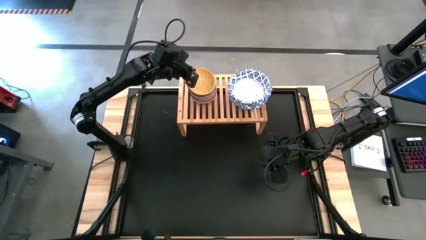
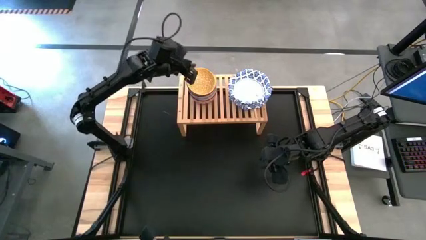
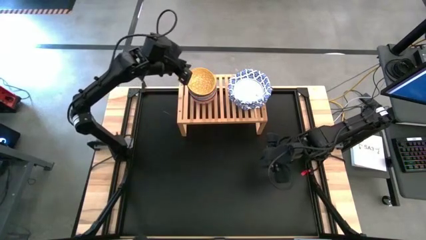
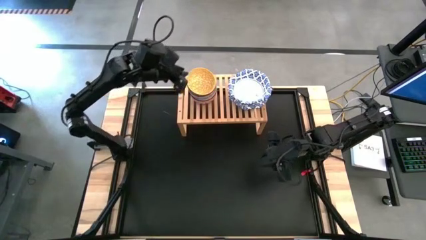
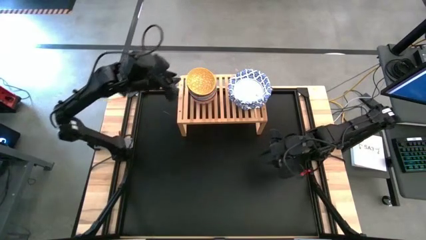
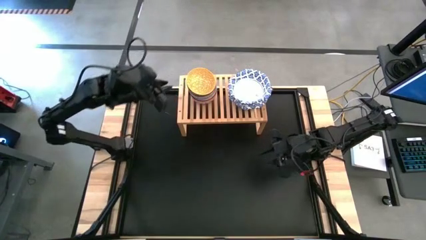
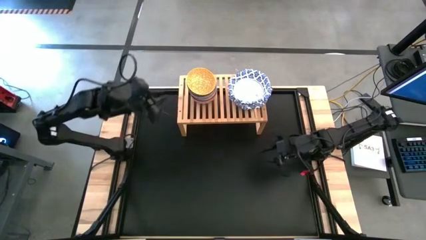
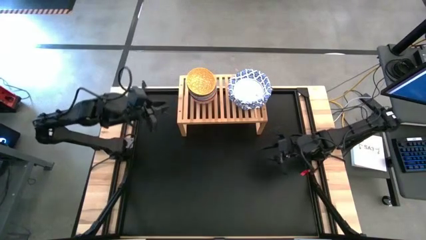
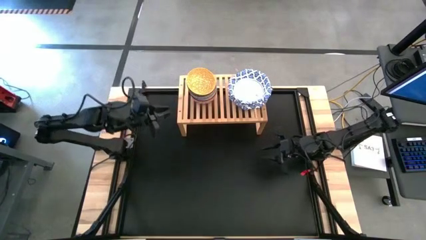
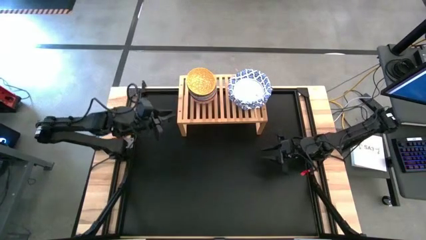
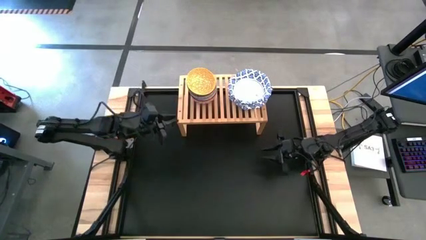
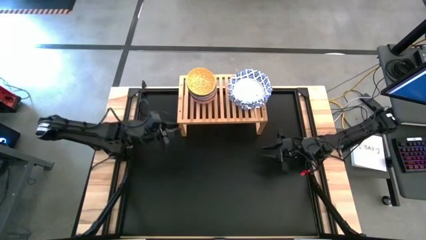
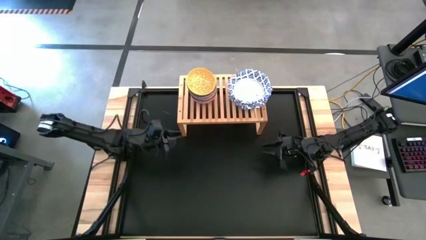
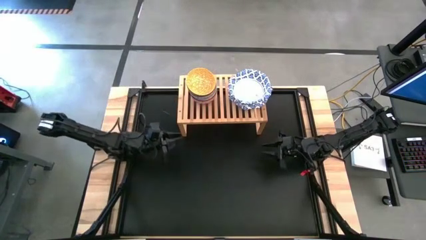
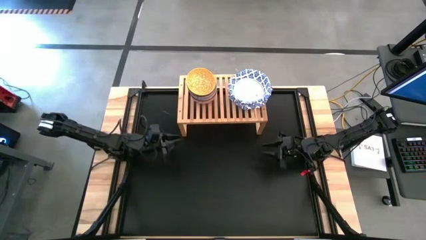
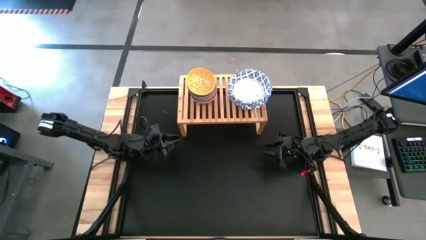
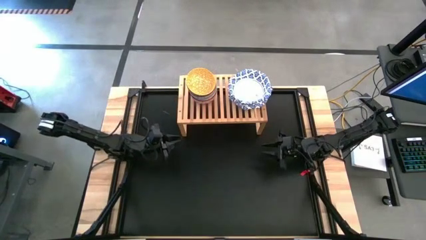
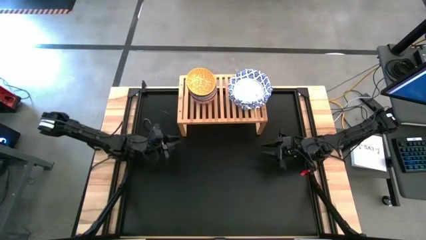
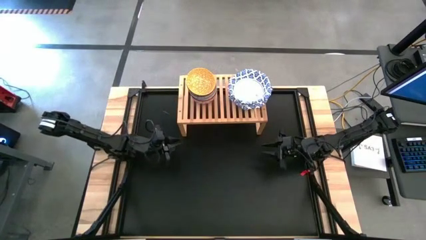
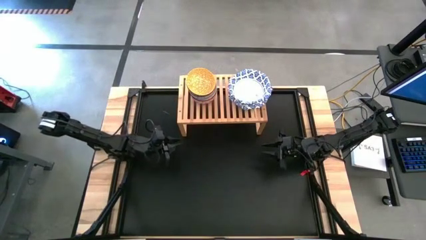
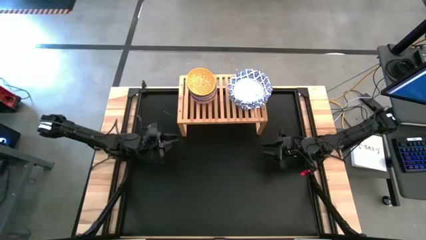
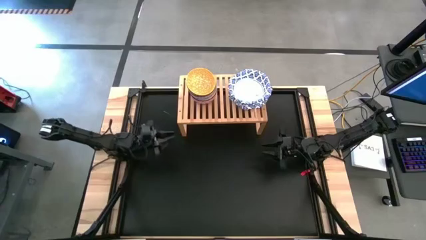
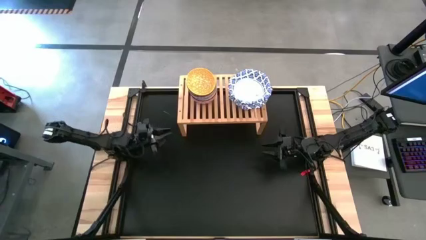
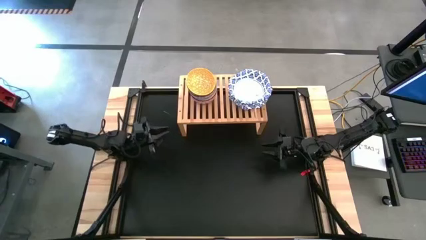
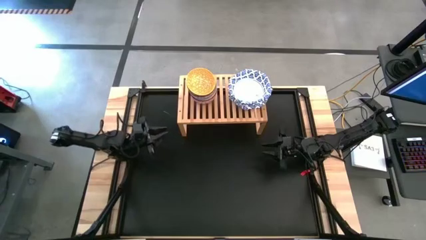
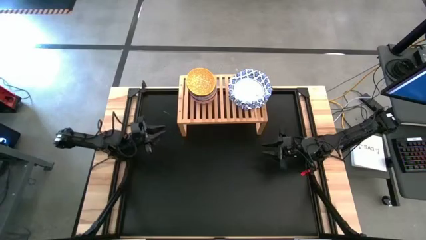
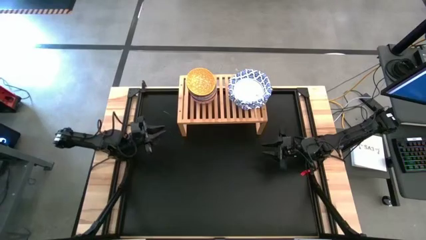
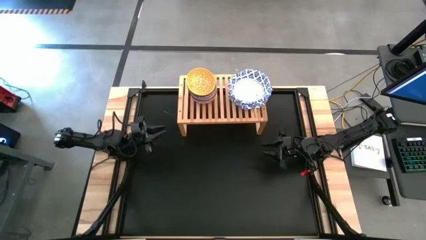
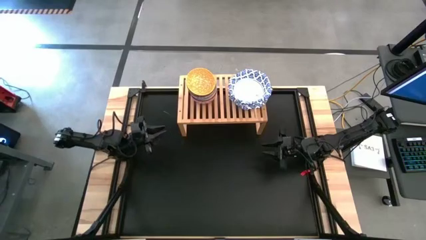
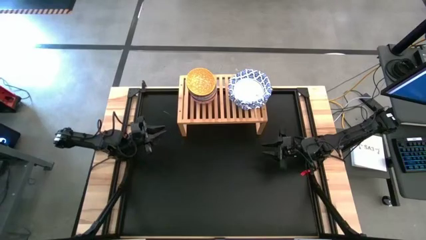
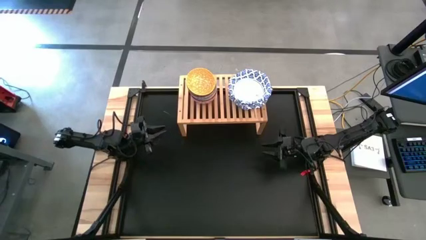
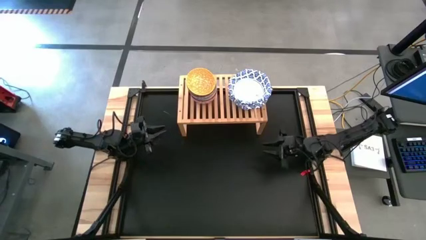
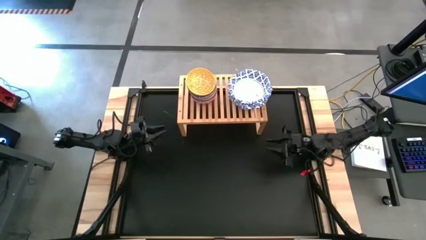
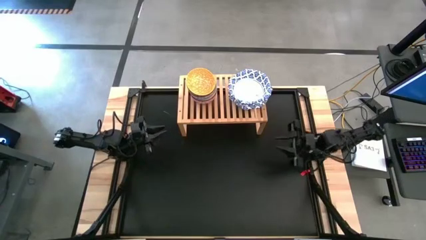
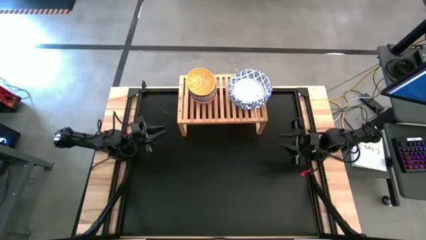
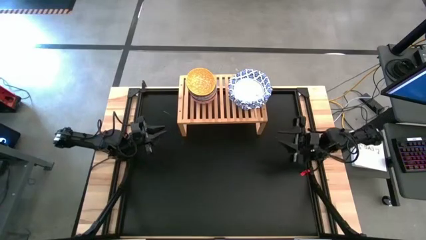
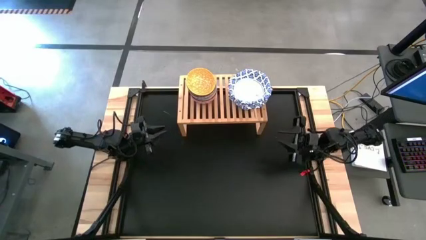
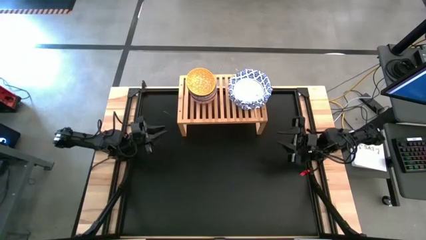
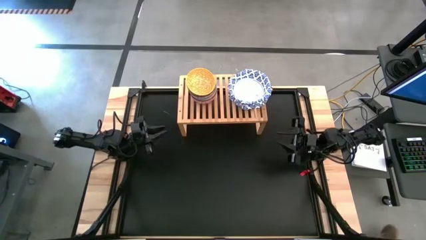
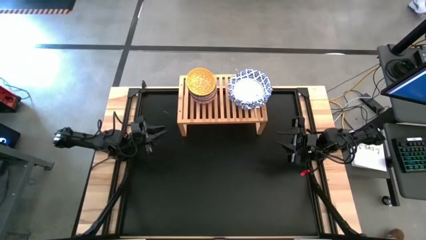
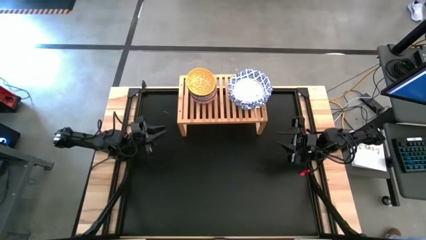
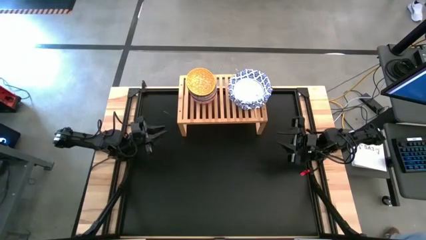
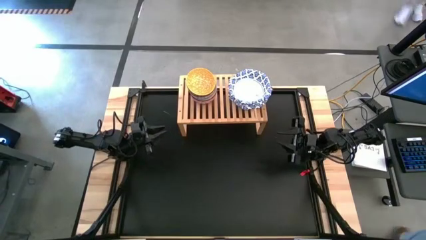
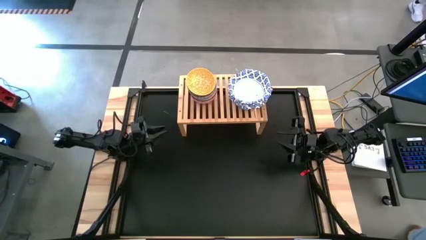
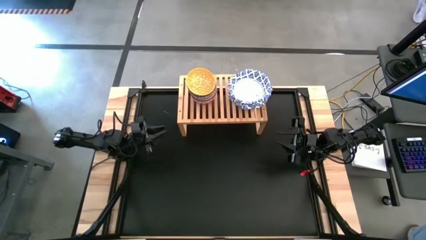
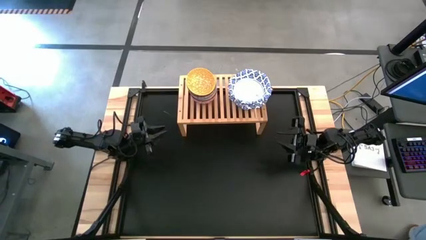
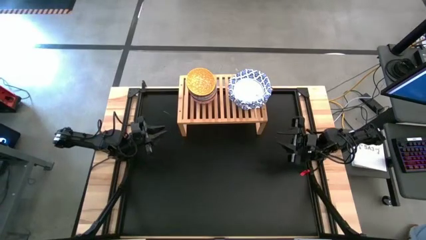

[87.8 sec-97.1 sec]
Task: Place and stack bowls onto a shelf
Return to Home Position

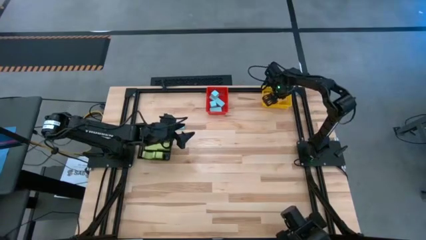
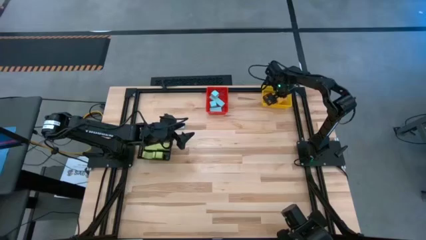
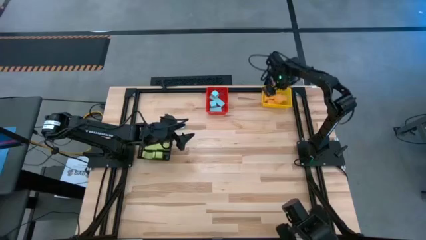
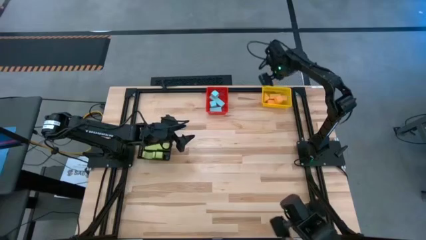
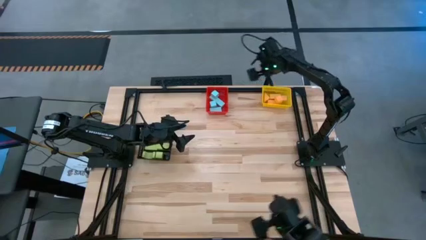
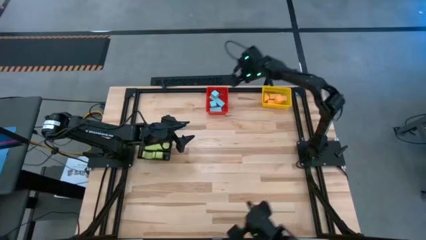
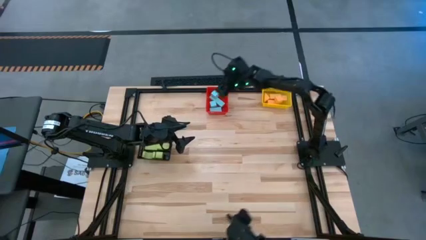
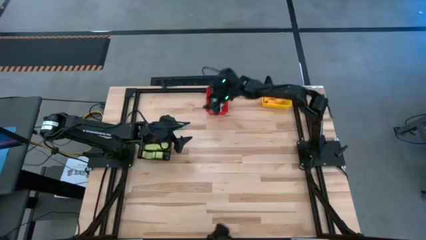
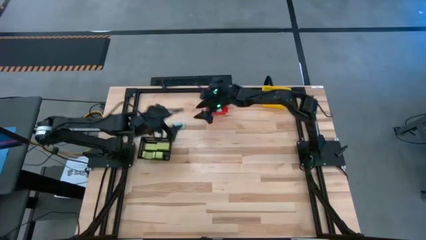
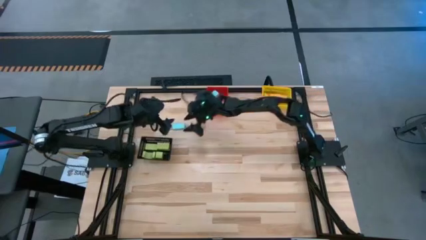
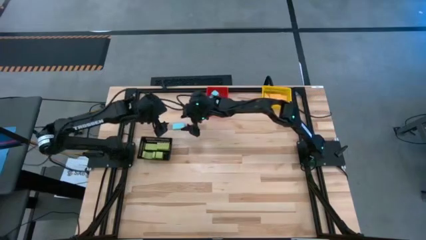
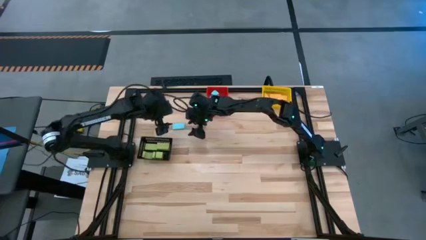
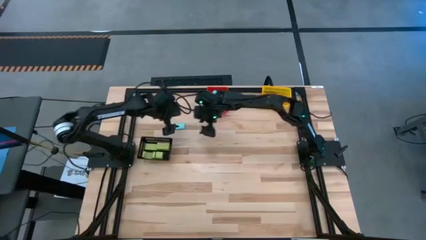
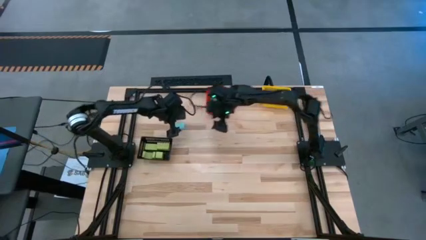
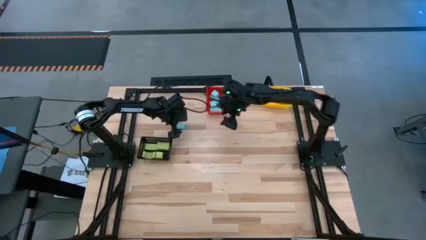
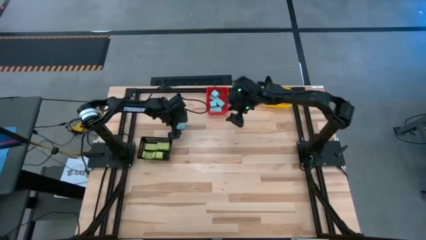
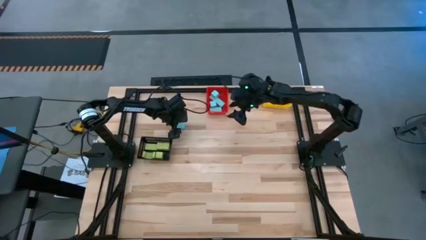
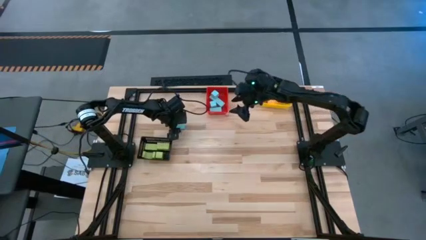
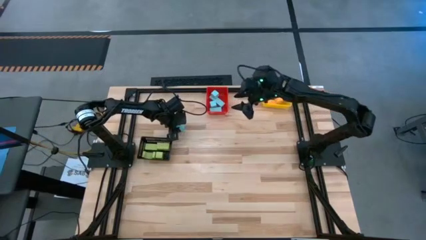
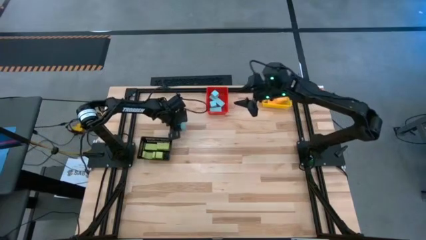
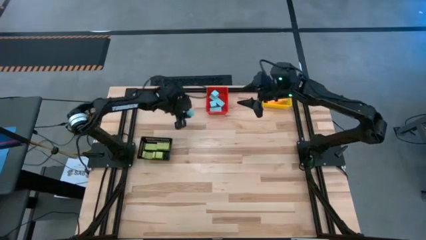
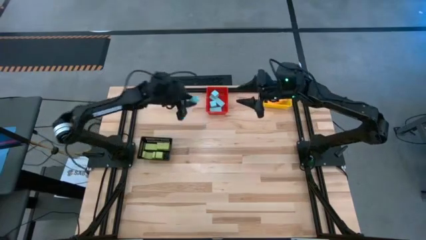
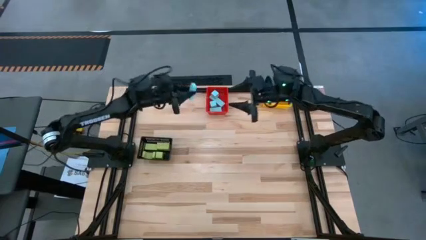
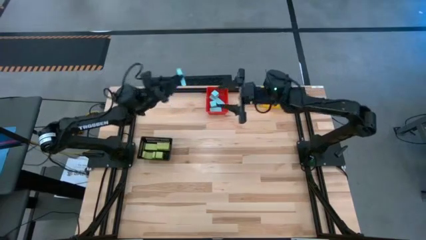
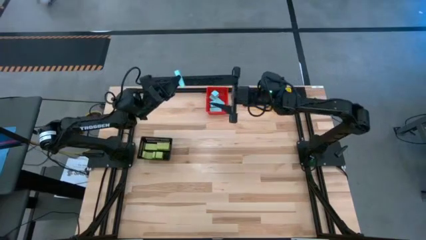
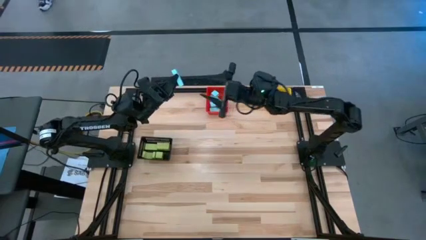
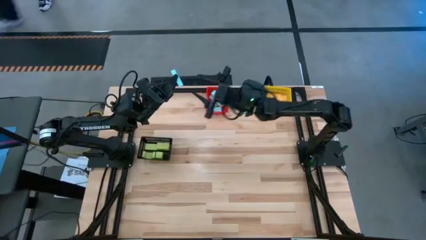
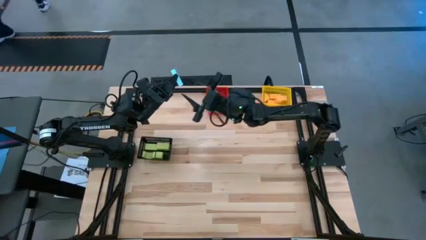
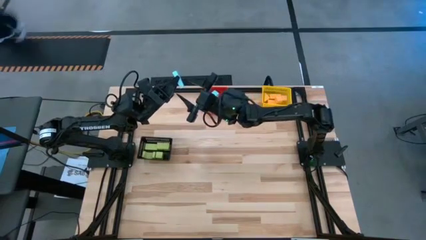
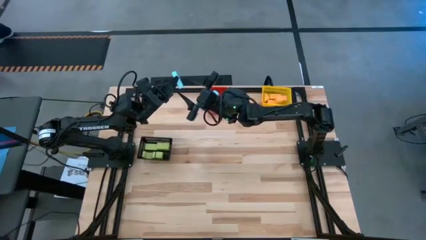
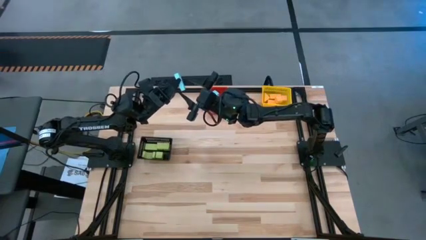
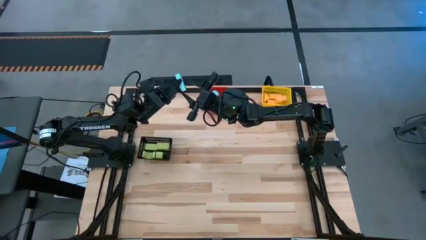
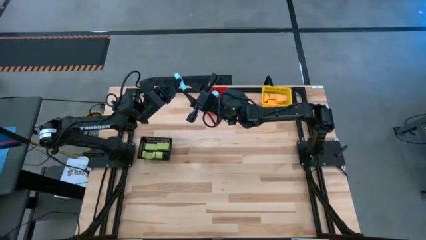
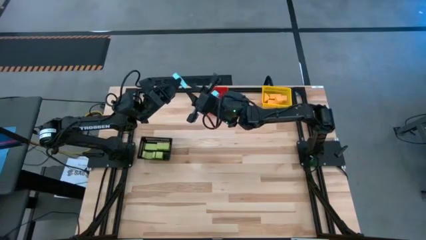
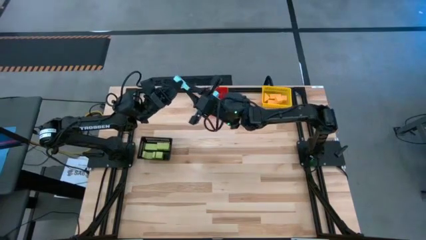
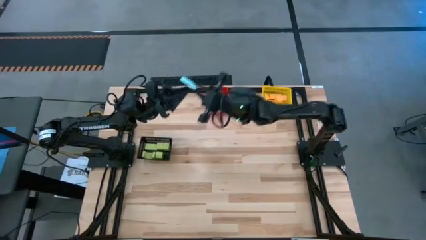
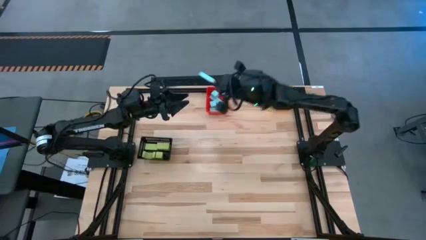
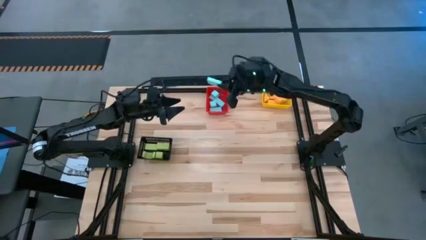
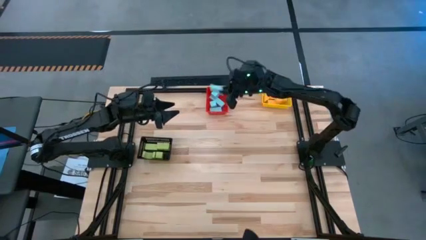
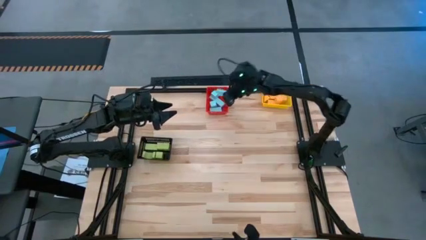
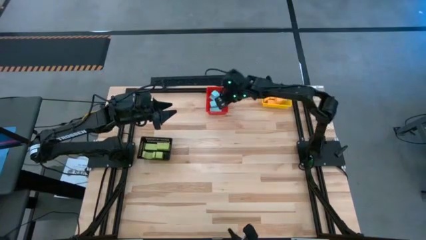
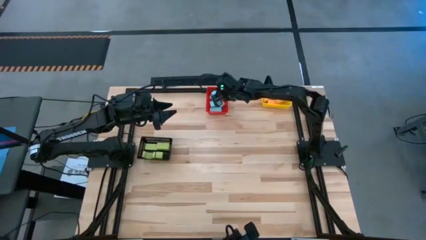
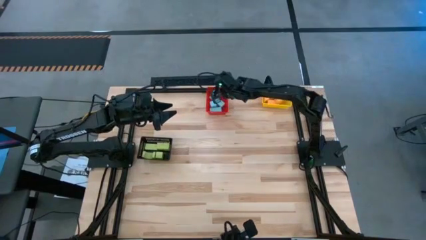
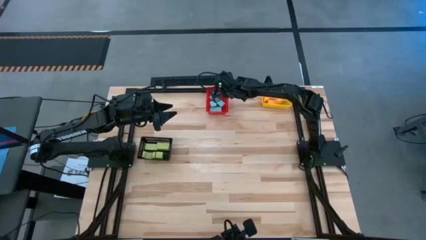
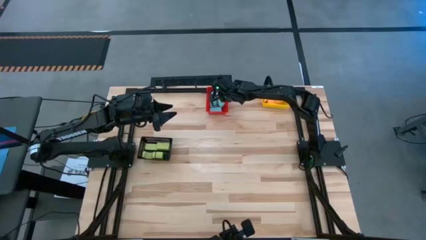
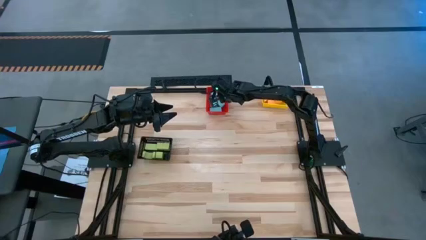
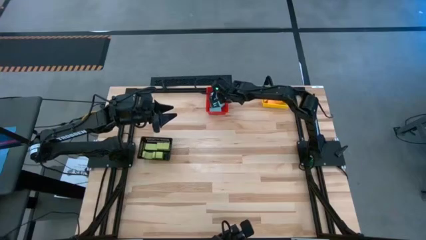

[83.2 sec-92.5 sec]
Task: Sort & place blocks by color
Put the blue block into the red bin
